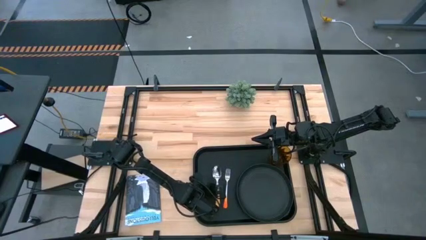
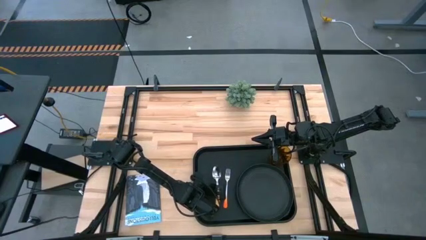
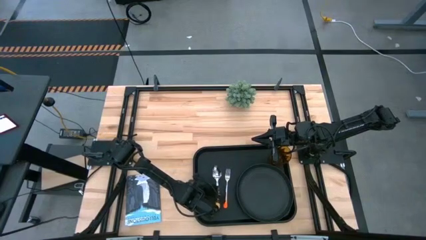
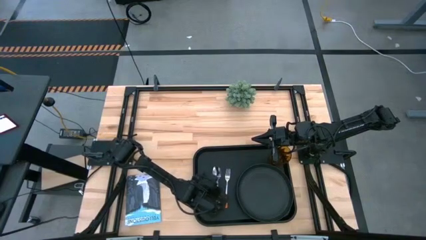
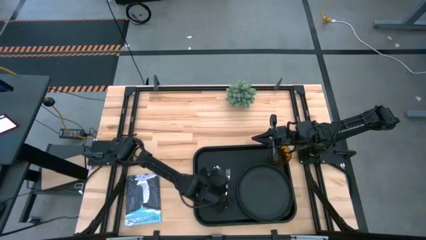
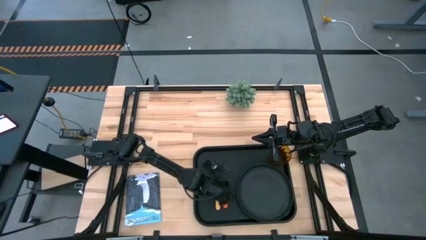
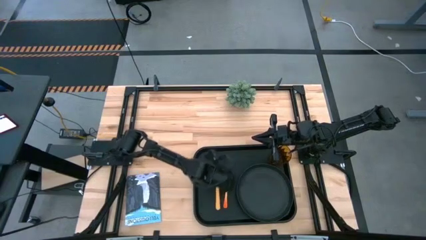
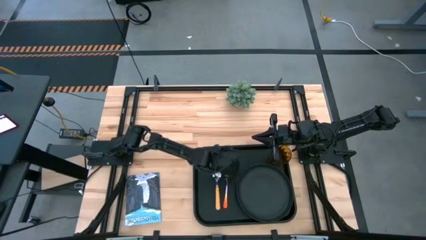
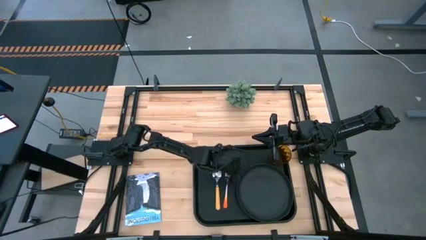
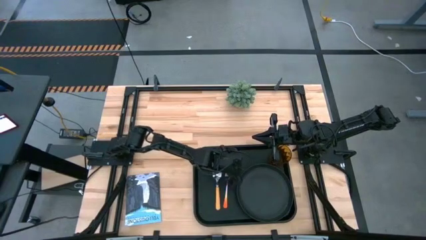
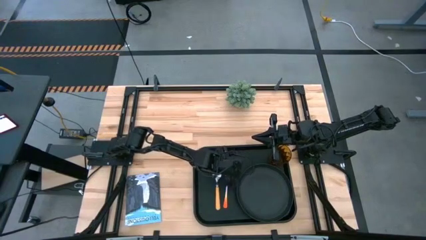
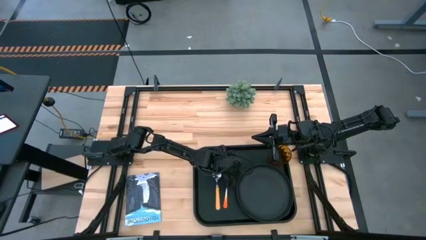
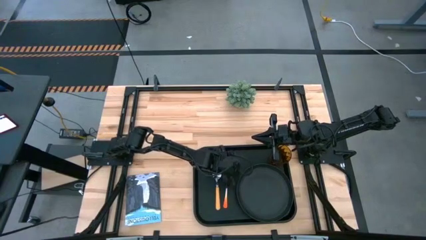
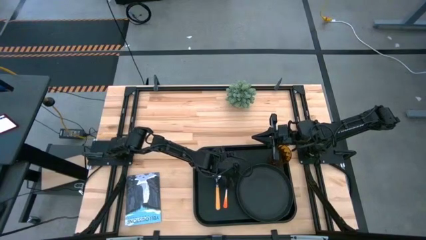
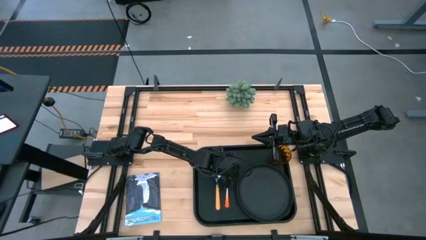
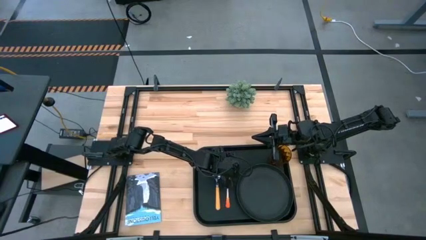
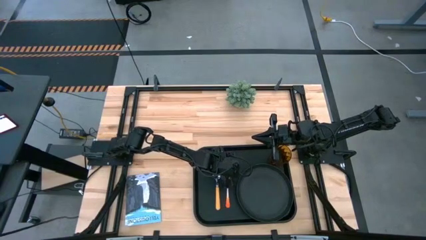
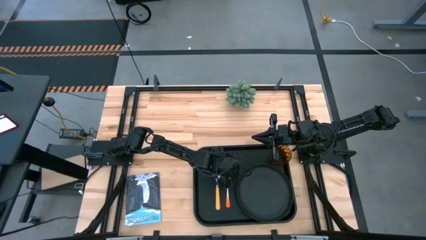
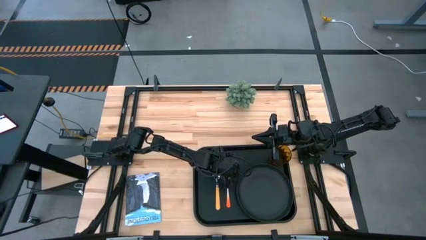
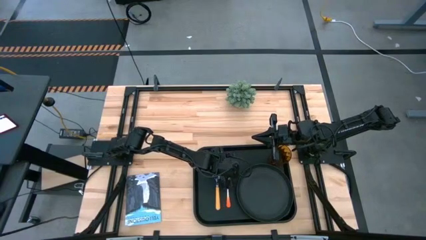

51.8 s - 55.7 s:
Task: Pick and place plate/cup/fork/spoon on tray
Adjust the orange fork

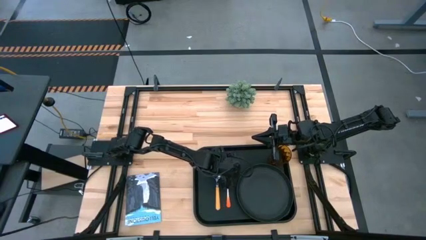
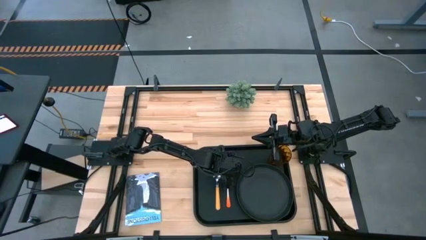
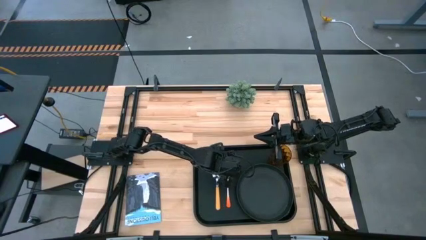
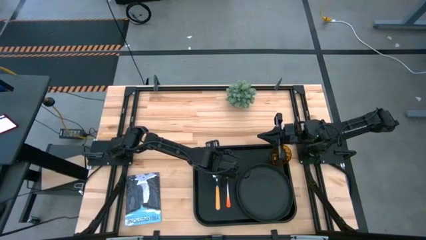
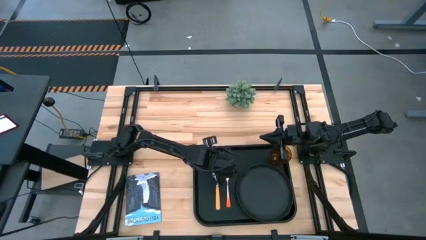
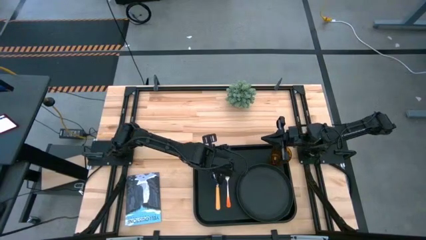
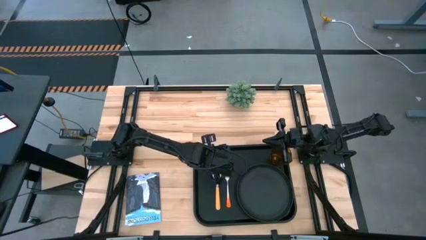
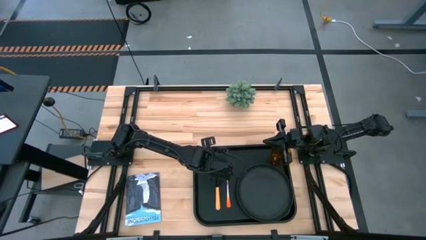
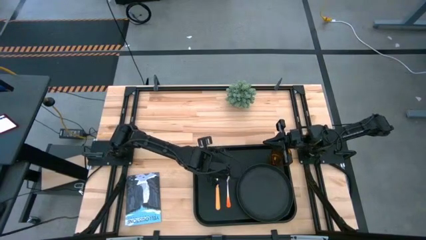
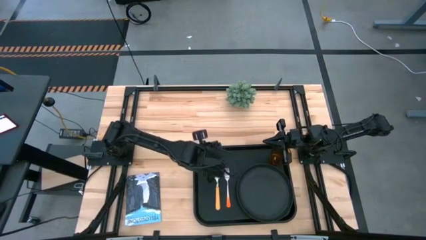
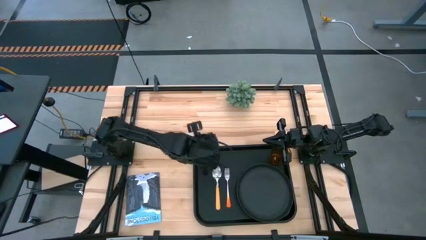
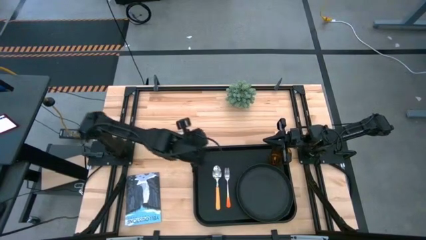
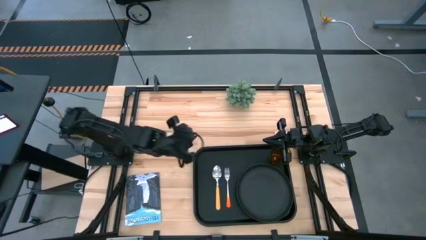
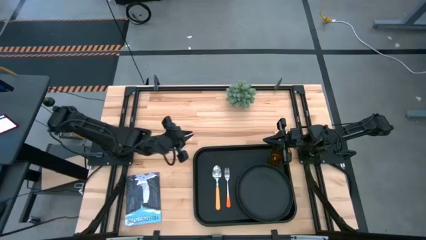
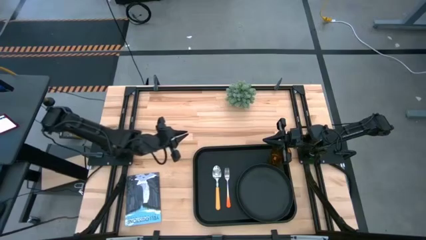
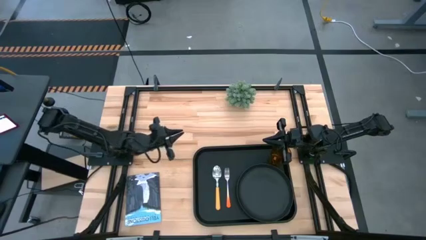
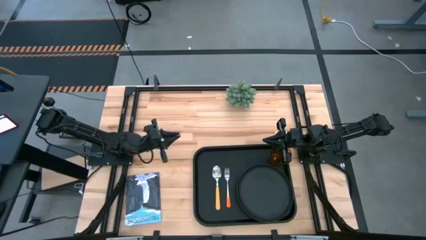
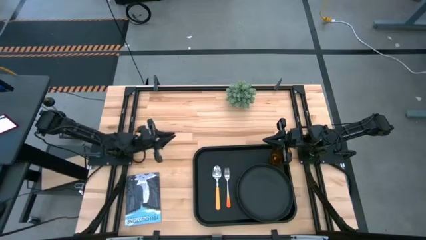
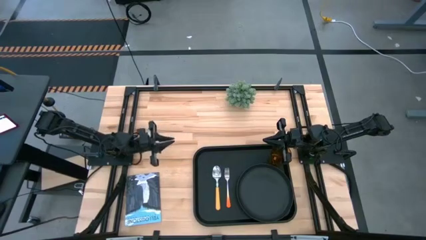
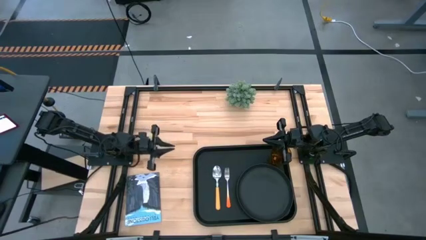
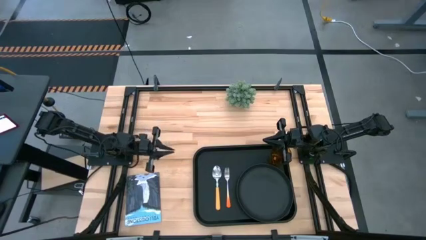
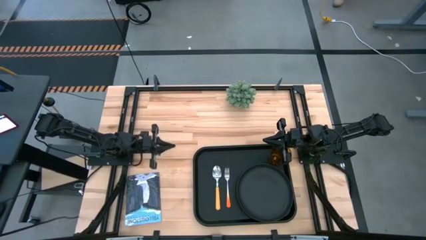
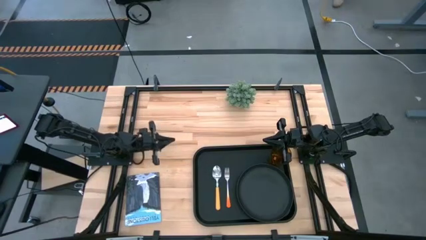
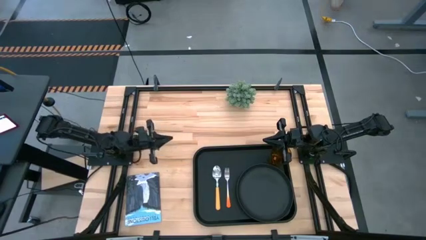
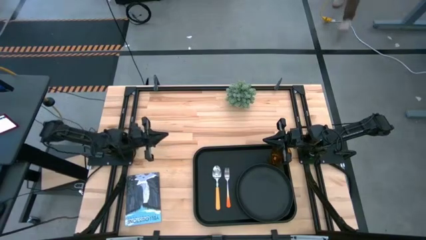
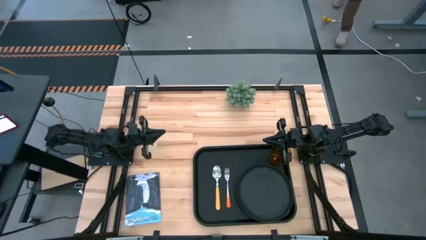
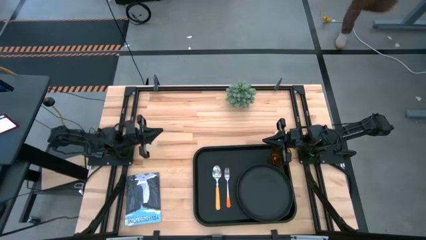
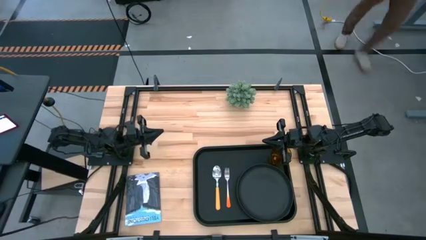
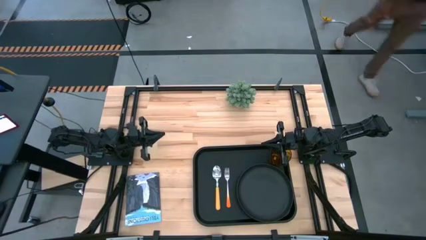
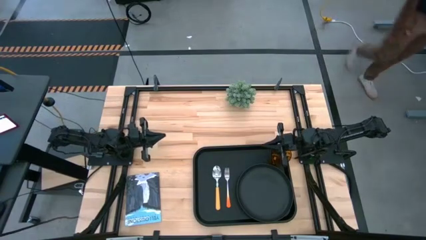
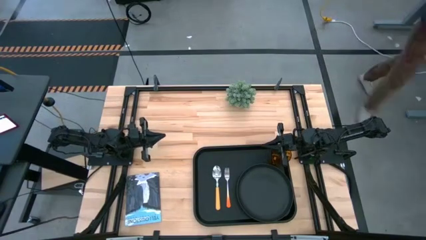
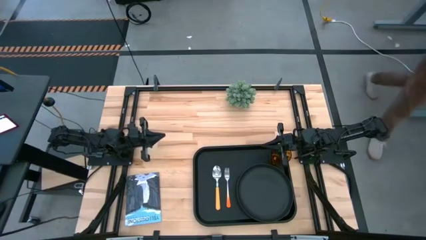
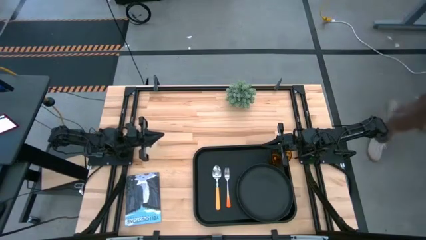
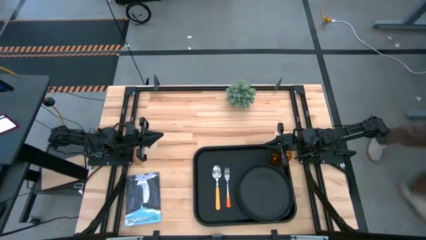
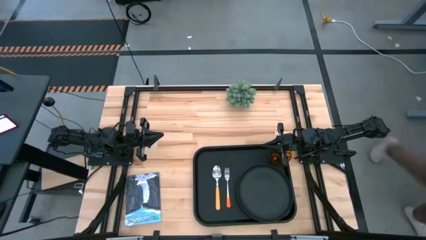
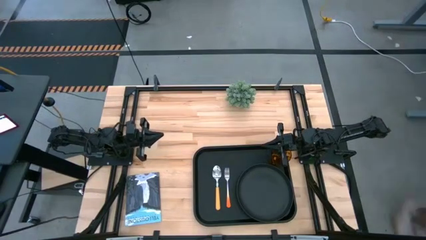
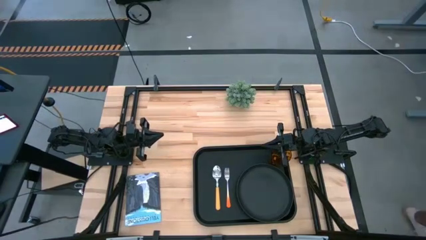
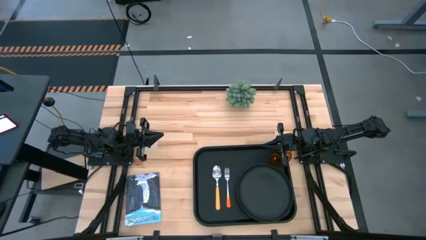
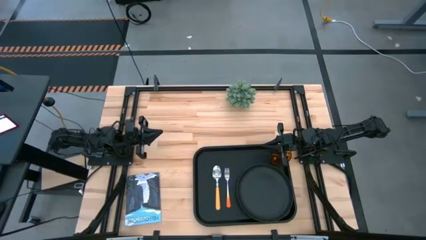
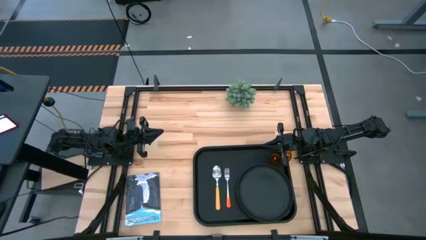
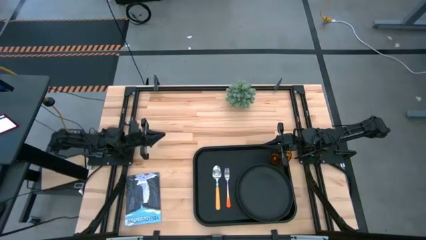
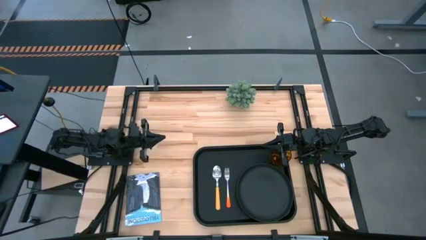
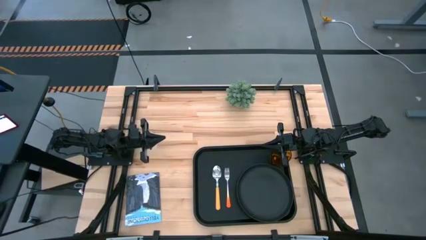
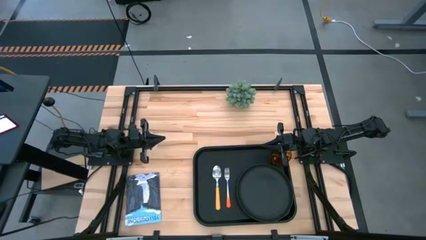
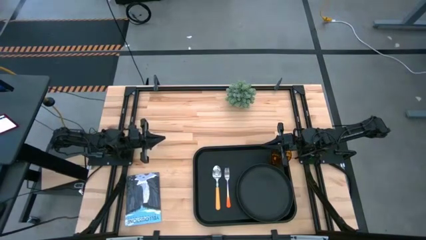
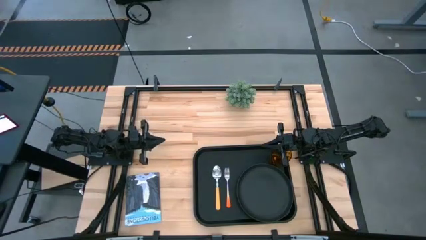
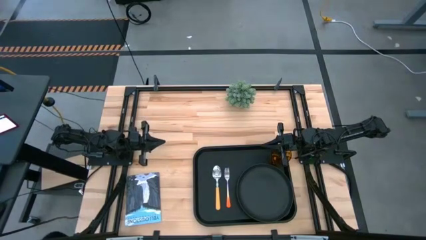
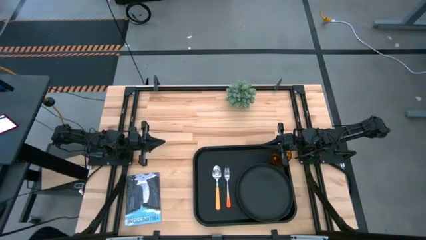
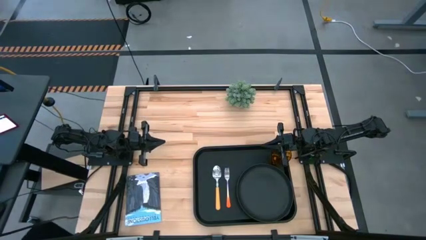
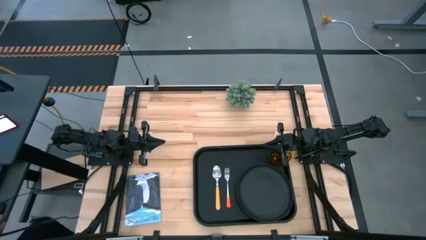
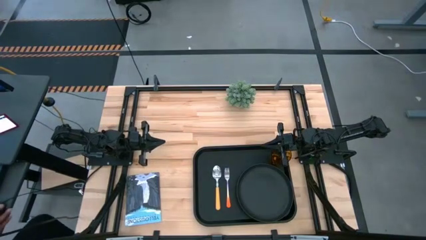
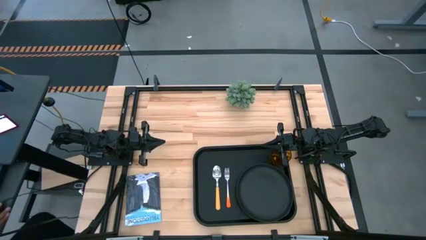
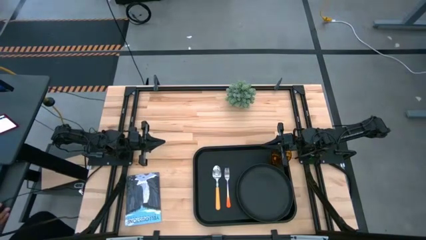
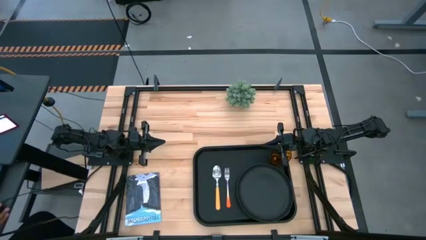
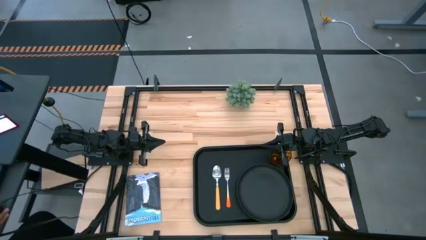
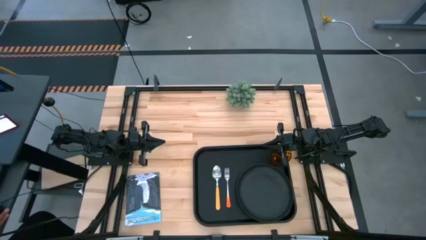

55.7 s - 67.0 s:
Return to Home Position
